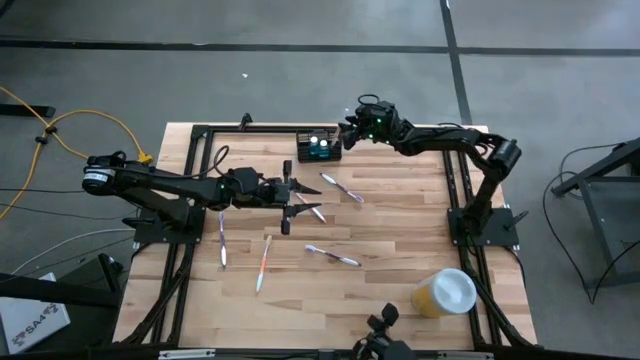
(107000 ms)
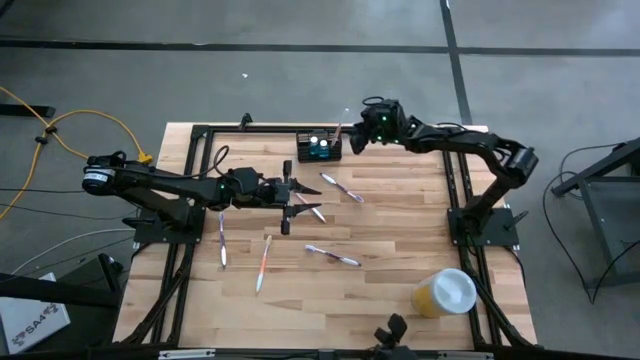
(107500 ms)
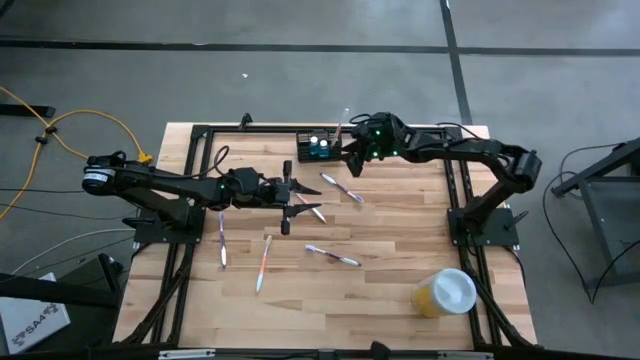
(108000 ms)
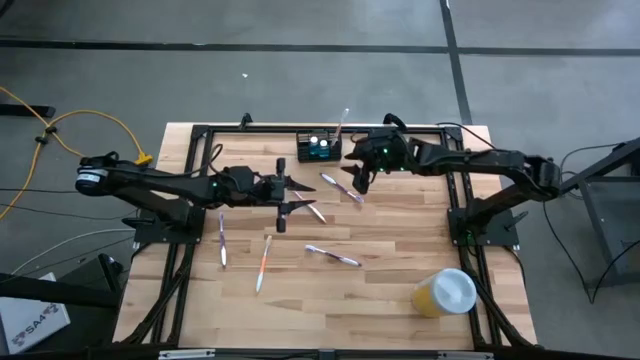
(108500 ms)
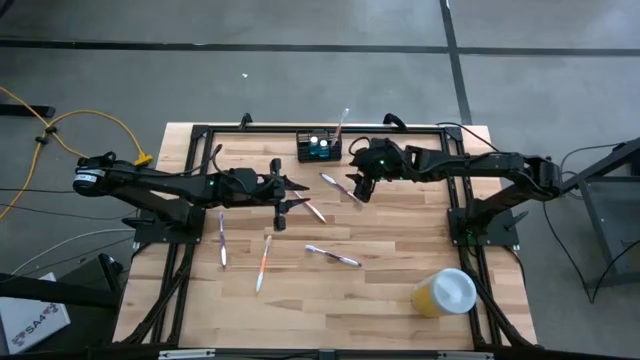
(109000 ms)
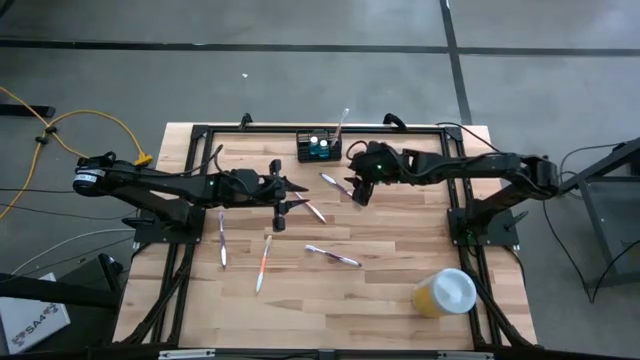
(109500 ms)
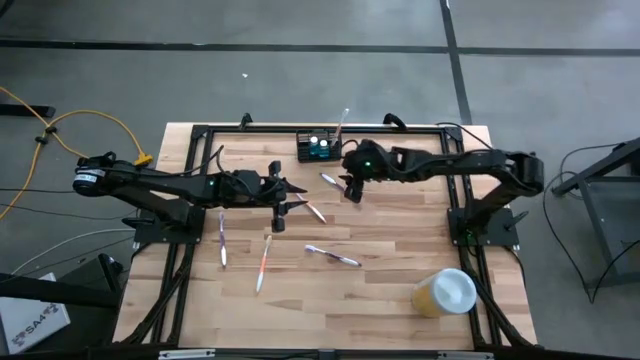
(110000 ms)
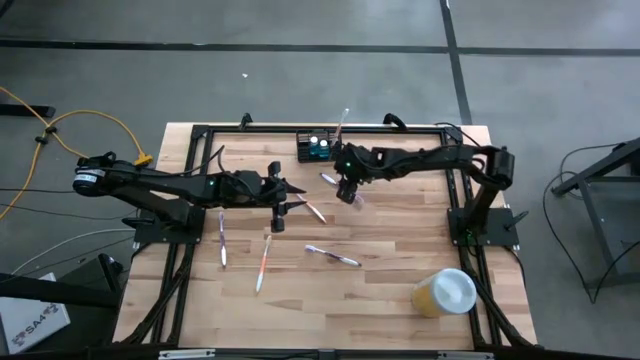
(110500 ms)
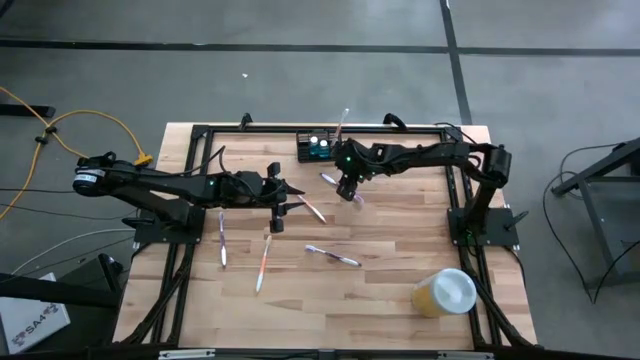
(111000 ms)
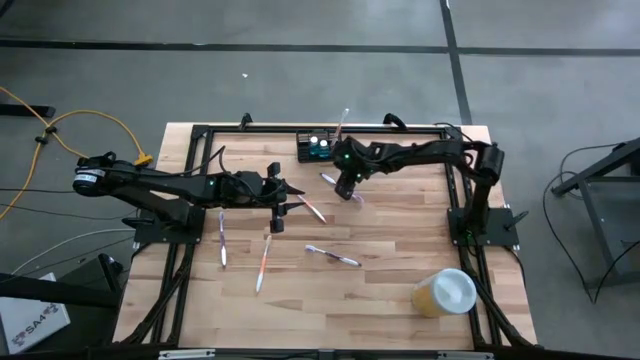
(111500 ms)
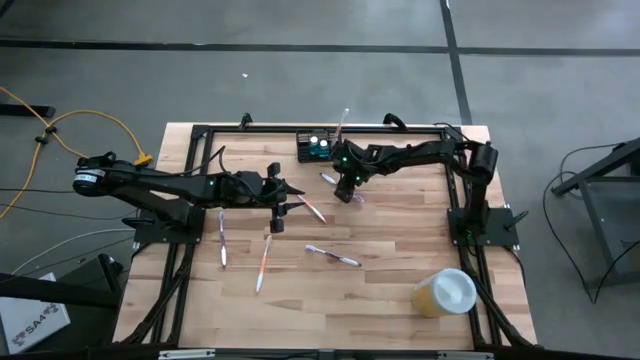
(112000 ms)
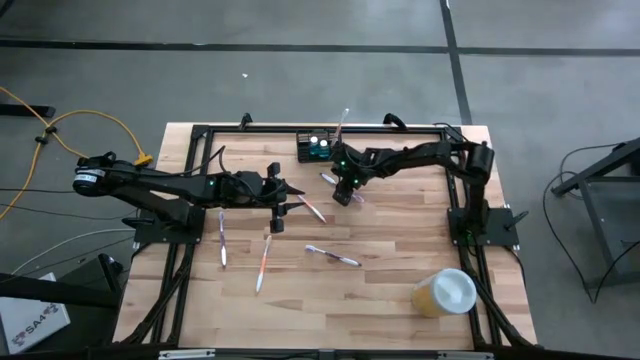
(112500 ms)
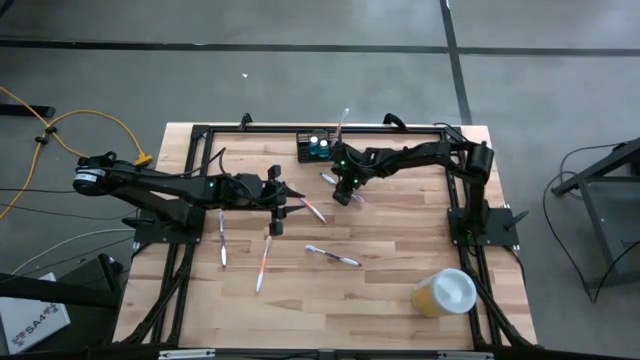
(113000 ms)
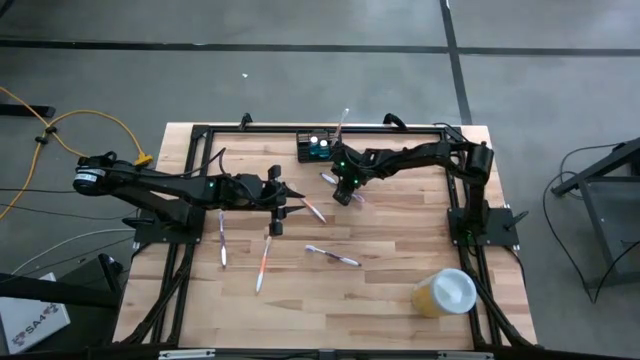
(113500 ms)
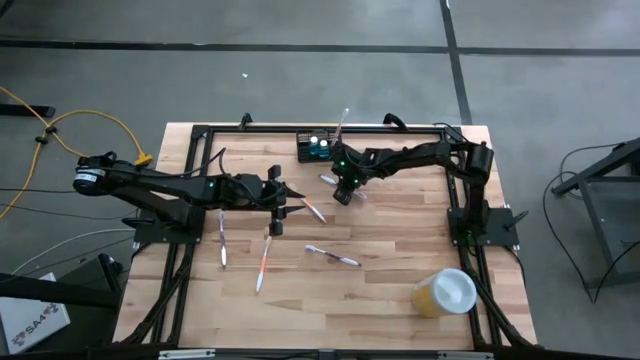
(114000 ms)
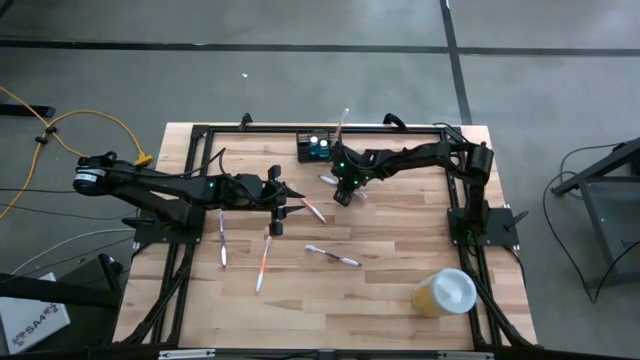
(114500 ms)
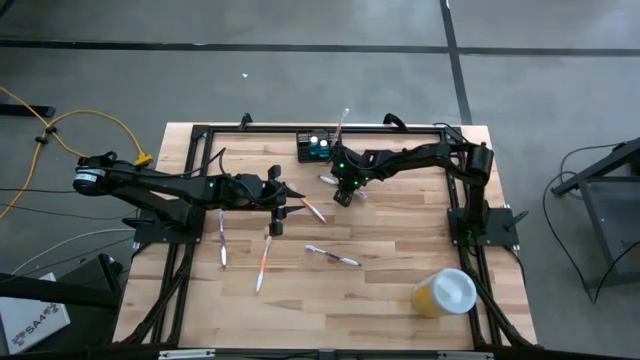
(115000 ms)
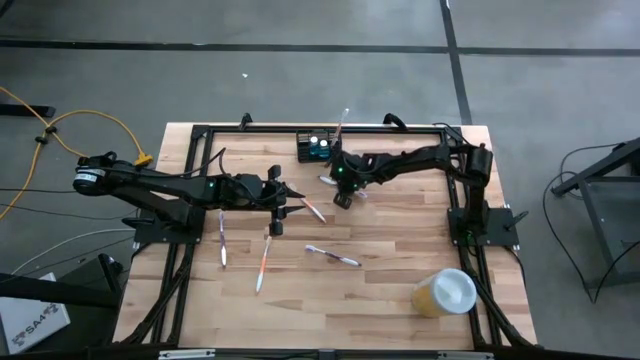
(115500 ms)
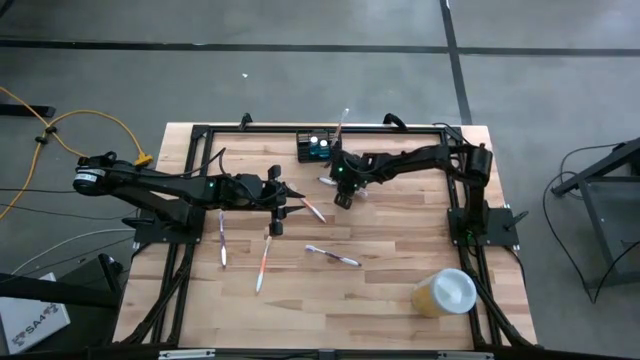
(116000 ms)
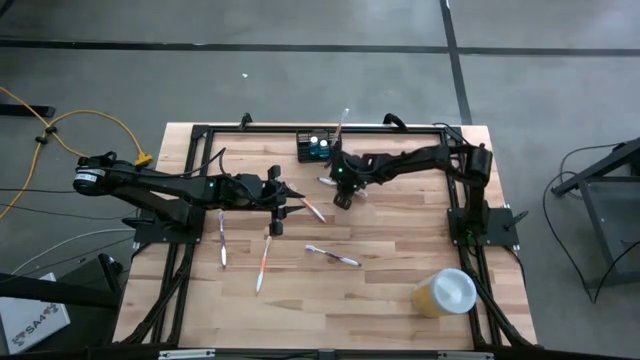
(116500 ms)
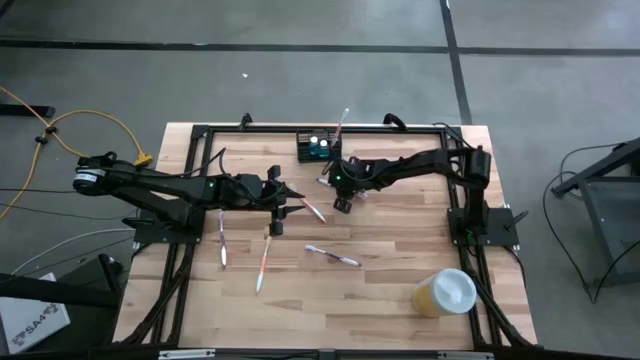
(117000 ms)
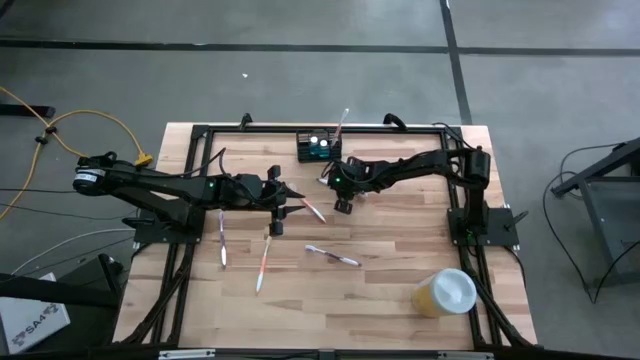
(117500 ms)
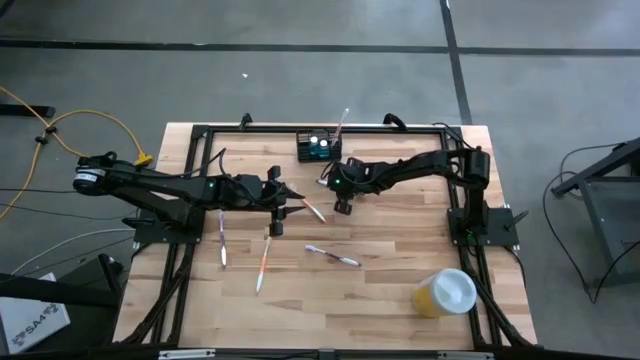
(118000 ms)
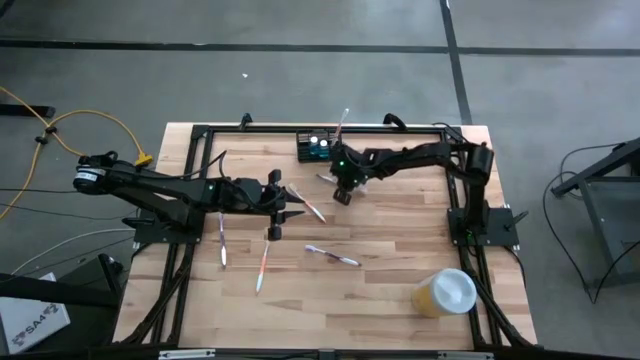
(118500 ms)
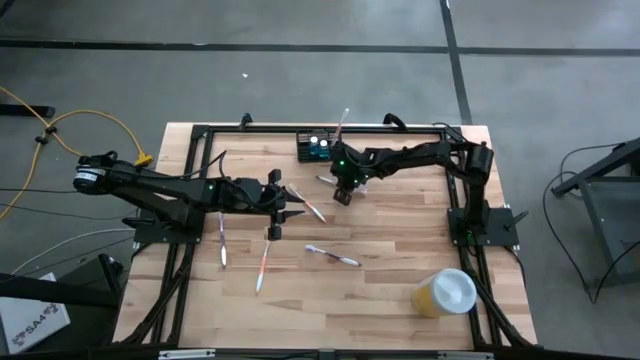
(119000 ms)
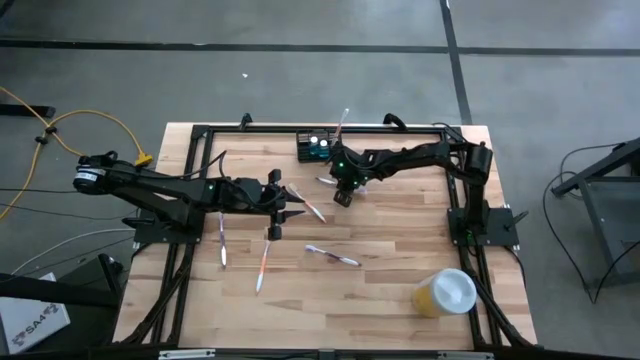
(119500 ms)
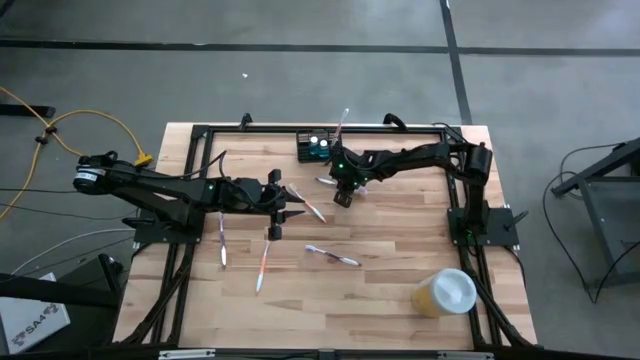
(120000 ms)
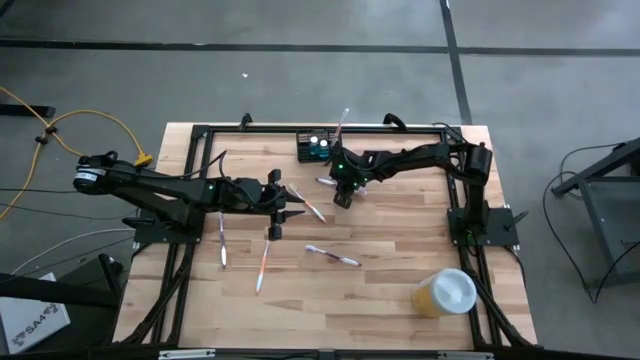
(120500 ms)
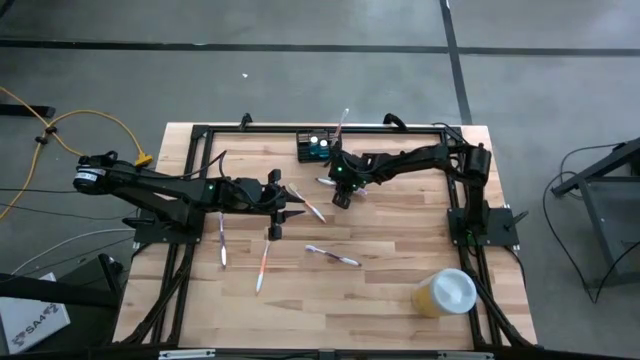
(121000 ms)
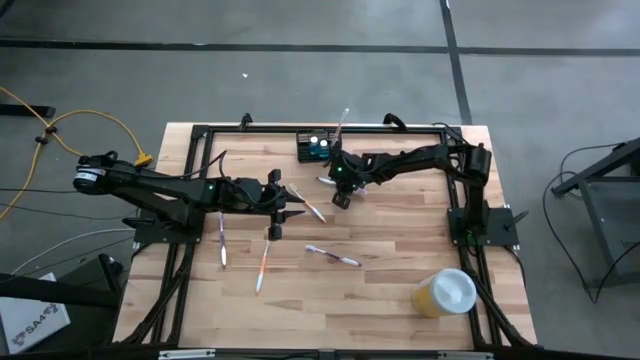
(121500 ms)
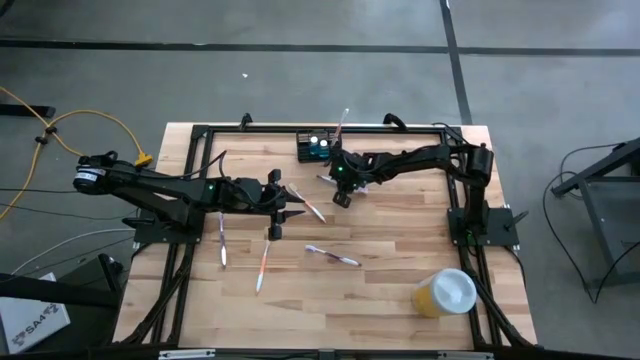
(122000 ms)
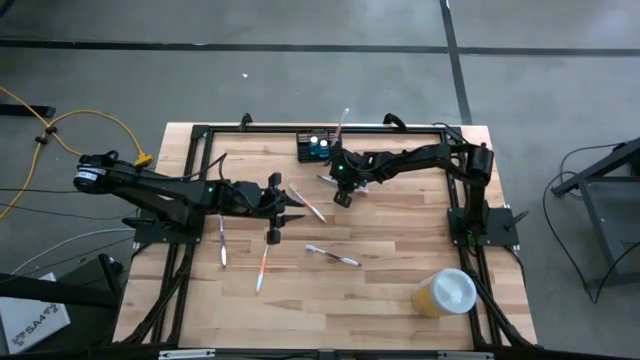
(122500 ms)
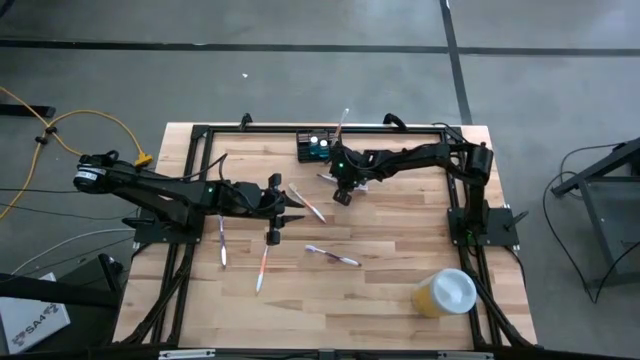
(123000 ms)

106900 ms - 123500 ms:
Task: Pick & Place toothbrushing station
Put the top right purple toothbrush into the wire organizer

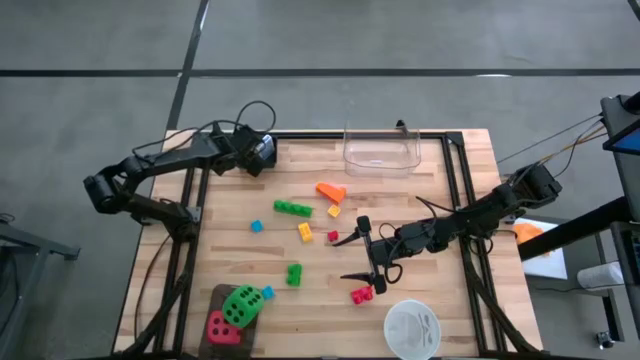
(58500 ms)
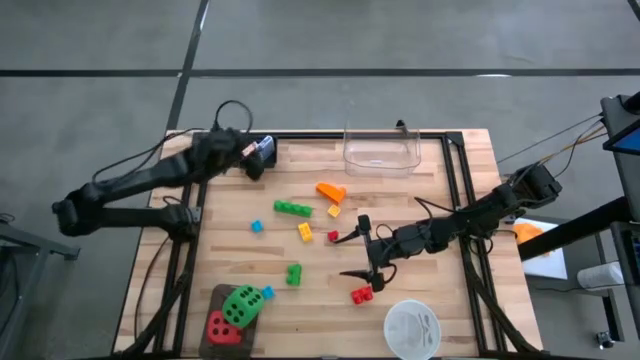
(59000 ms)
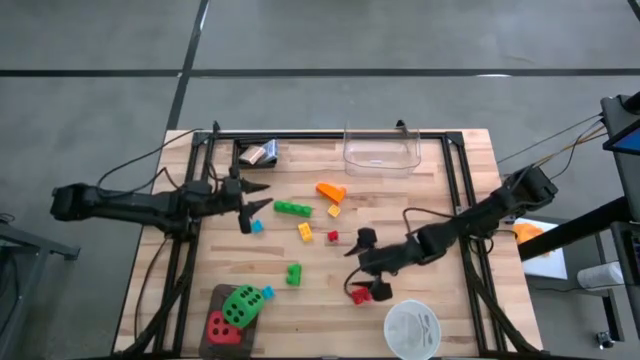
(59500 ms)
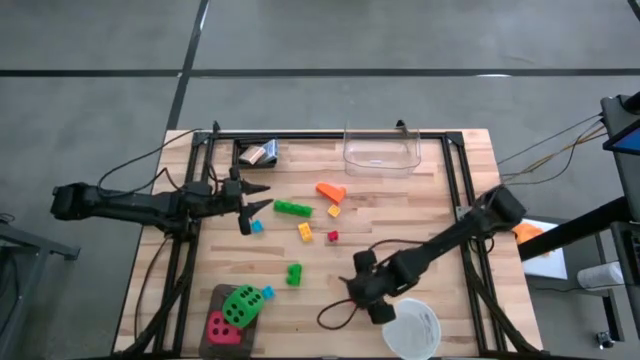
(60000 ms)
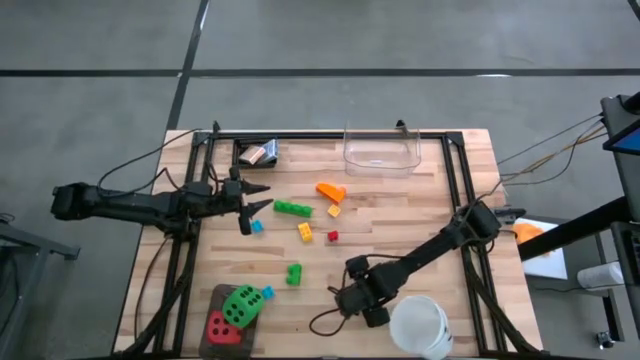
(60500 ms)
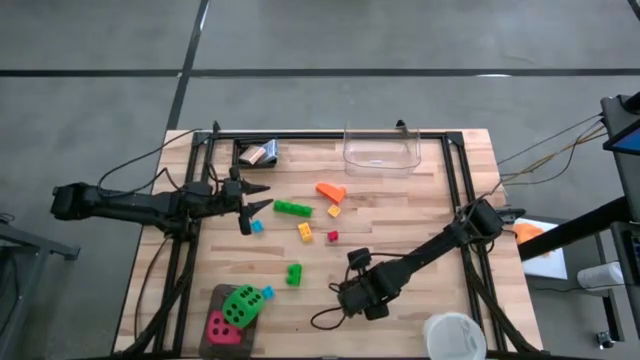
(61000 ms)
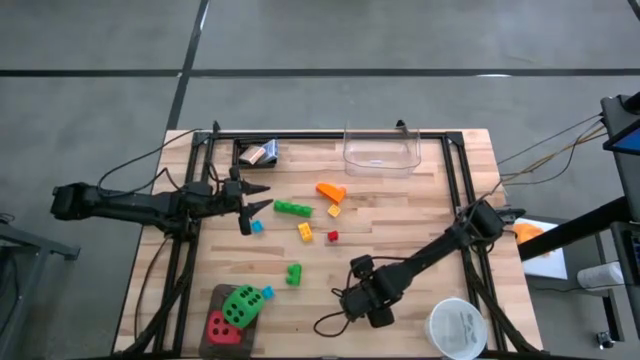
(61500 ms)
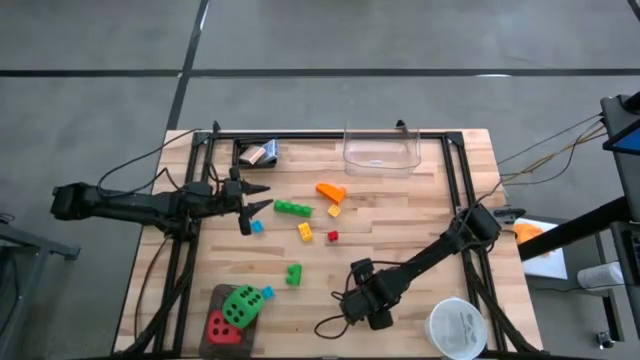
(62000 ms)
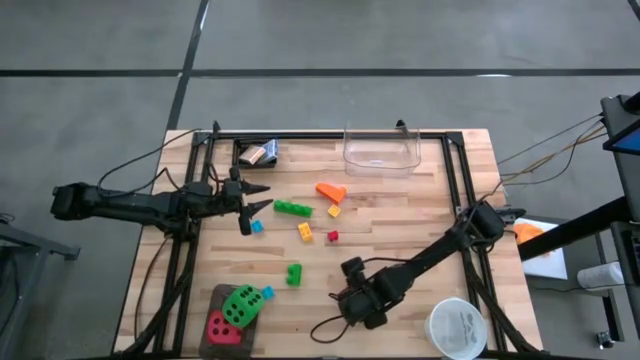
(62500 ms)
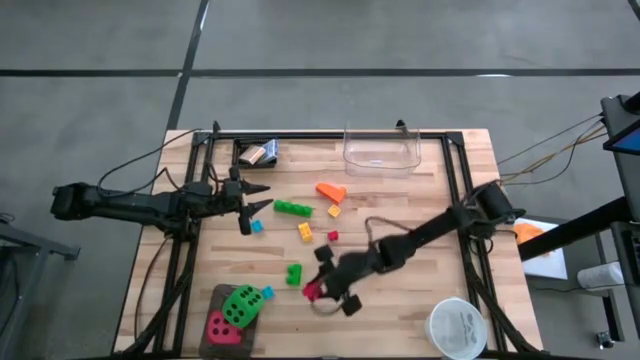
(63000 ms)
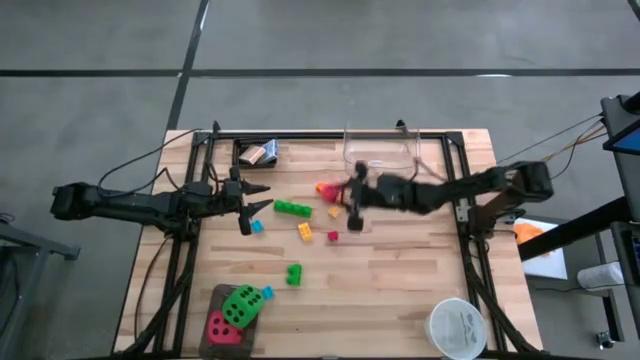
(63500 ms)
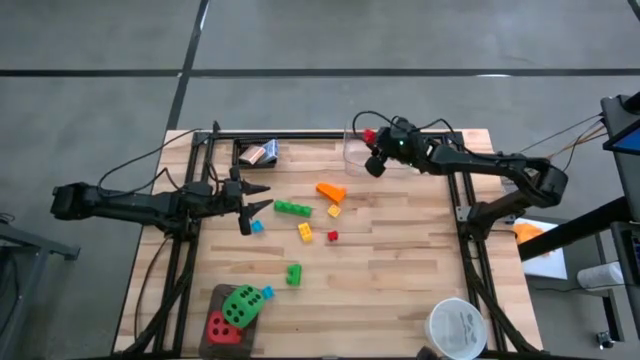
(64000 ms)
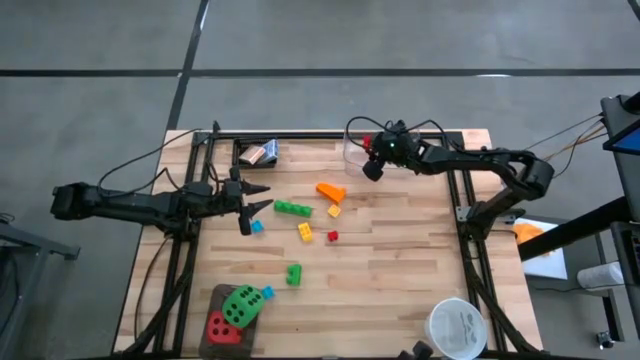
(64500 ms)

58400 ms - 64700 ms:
Task: Pick & Place Toys
Put the bottom red game piece into the transparent bin
